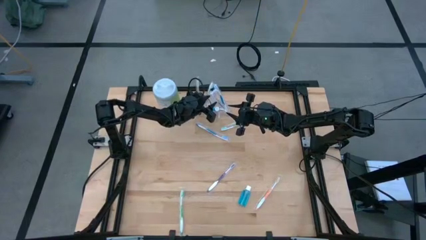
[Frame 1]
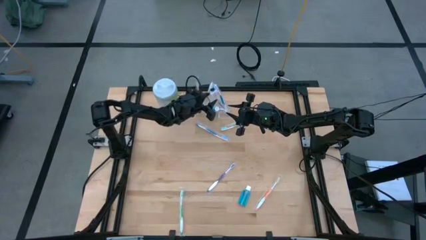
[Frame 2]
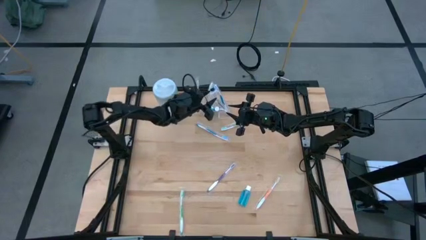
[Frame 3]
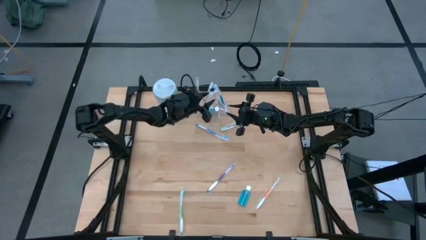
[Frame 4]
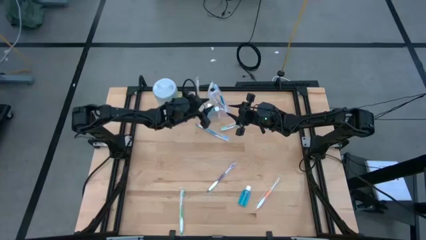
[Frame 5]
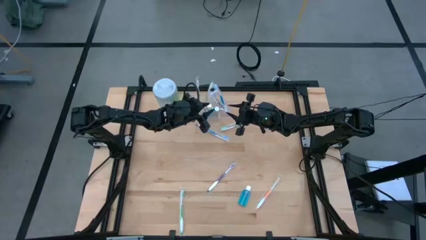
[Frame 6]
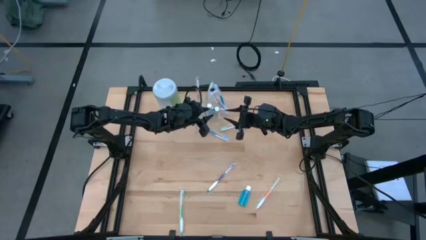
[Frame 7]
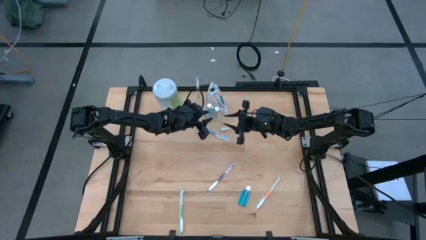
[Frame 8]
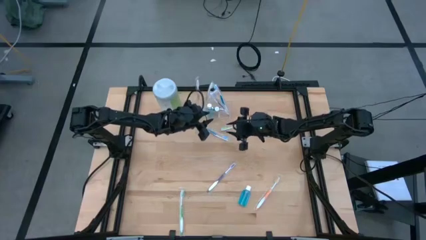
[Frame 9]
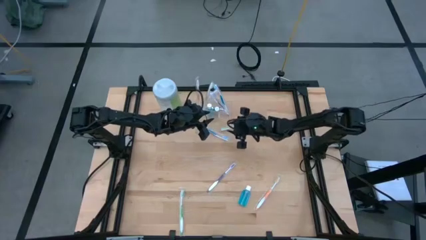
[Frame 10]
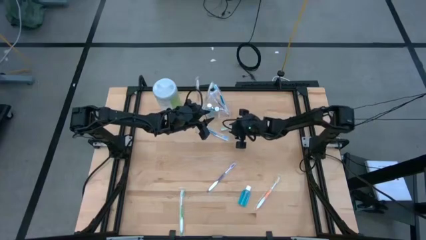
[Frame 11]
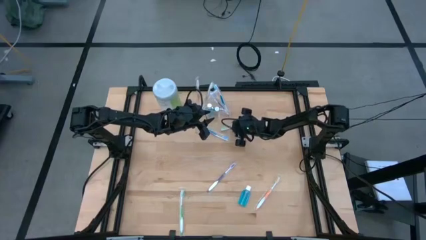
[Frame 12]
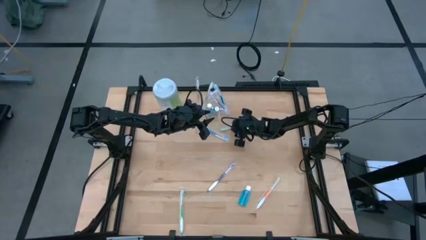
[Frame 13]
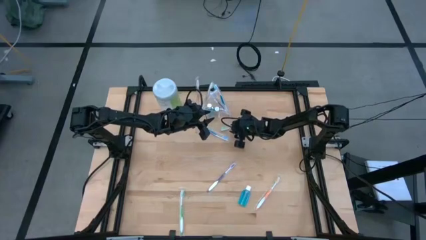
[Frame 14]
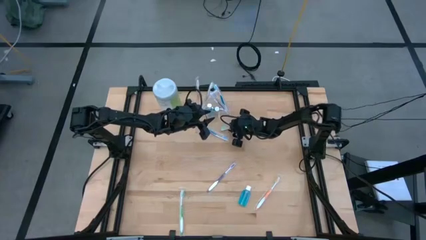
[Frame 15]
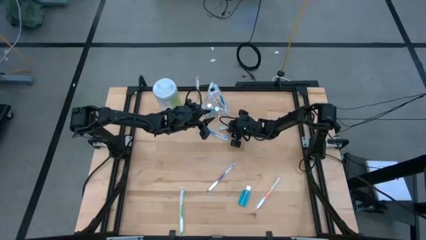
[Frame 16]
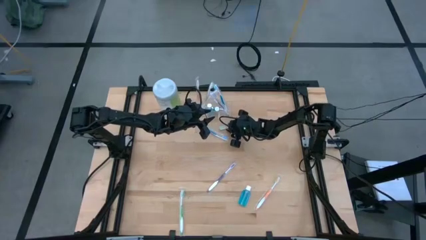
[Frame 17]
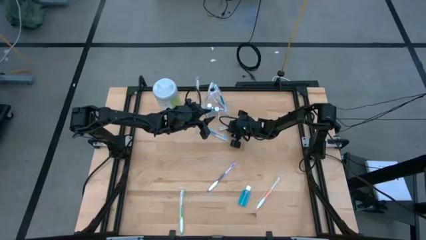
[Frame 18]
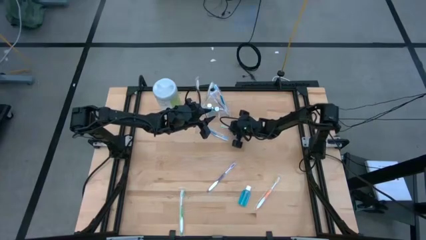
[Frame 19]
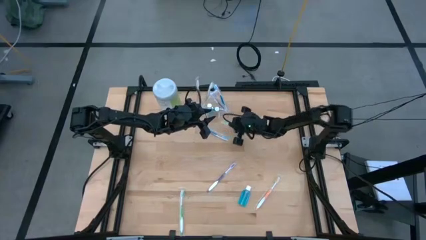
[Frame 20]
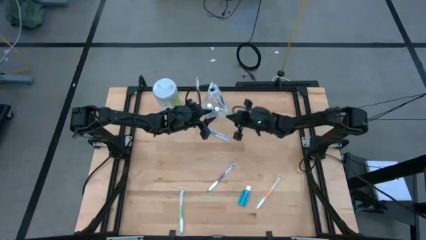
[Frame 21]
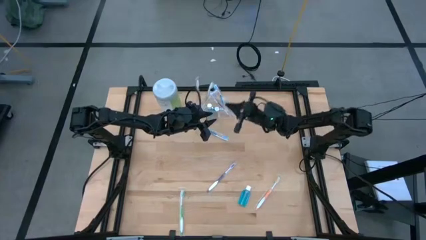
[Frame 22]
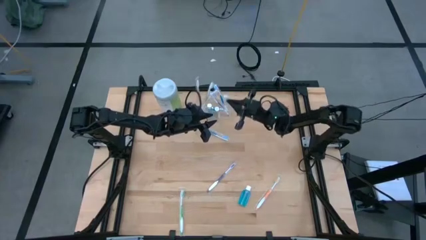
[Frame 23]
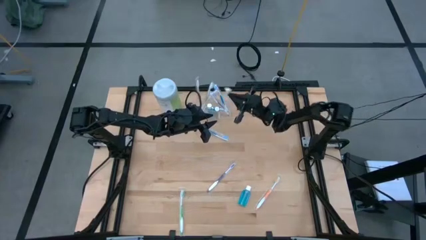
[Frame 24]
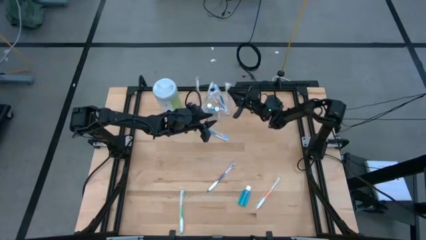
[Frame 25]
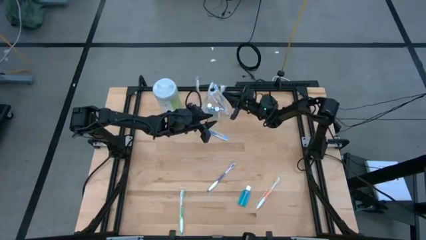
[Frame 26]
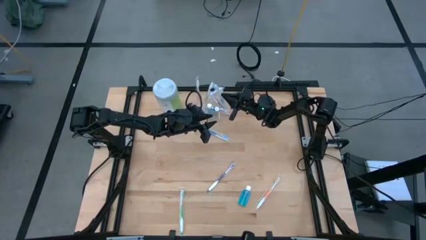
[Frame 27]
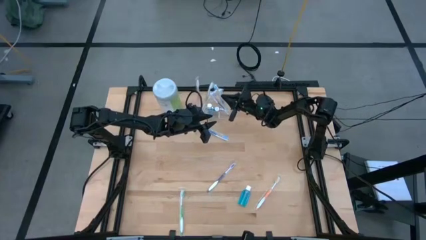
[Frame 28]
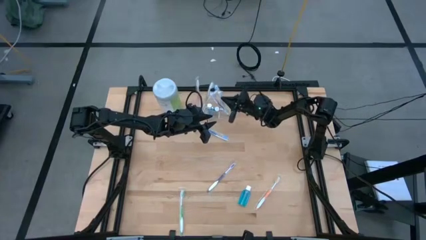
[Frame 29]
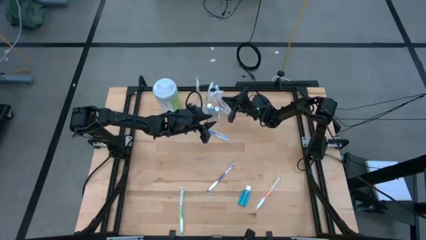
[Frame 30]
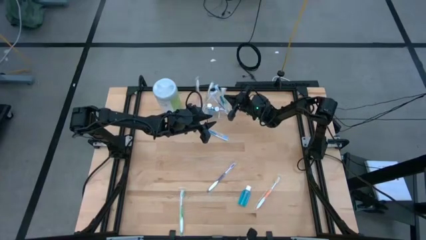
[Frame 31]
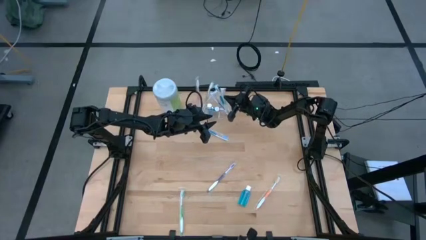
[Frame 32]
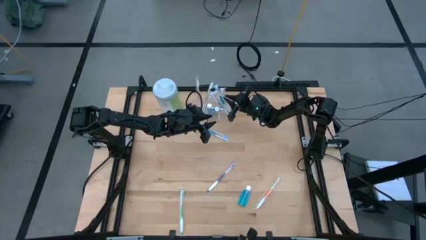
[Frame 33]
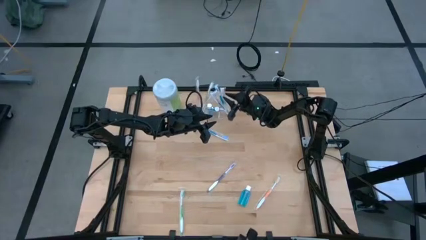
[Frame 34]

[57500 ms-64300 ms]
Task: Pick & Place toothbrushing station
Put the top green toothbrush into the transparent organizer

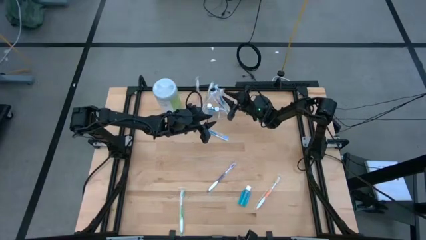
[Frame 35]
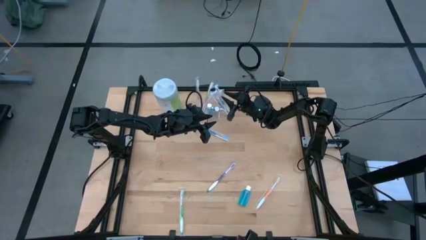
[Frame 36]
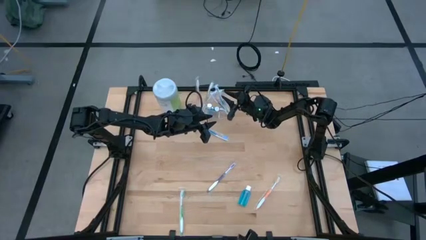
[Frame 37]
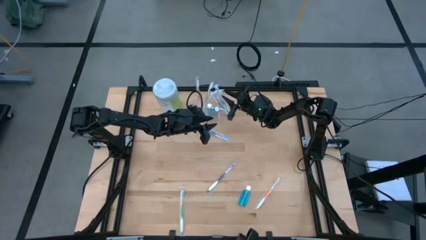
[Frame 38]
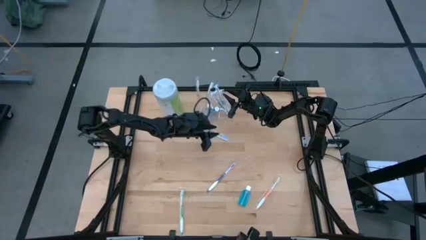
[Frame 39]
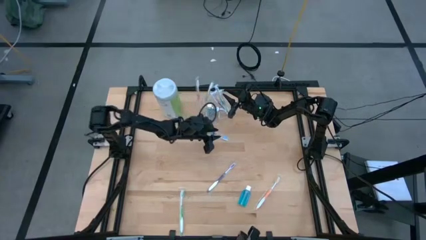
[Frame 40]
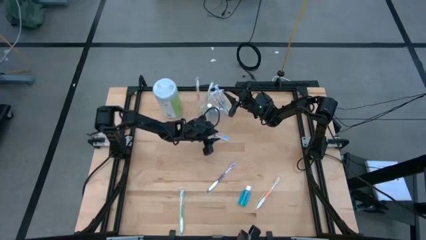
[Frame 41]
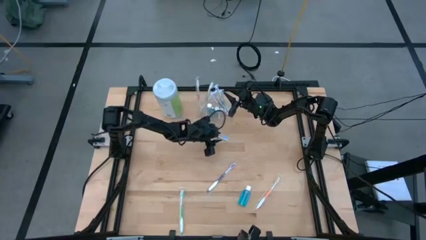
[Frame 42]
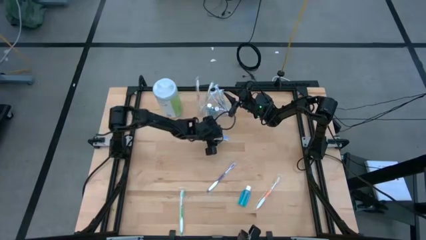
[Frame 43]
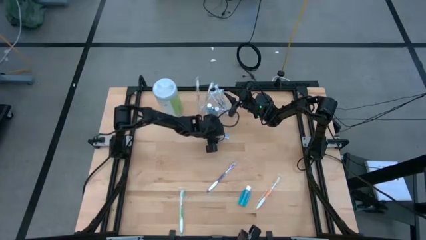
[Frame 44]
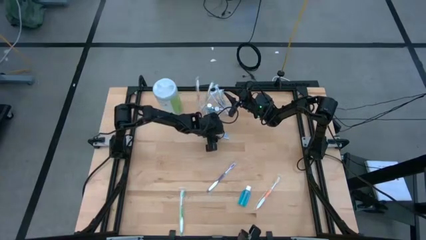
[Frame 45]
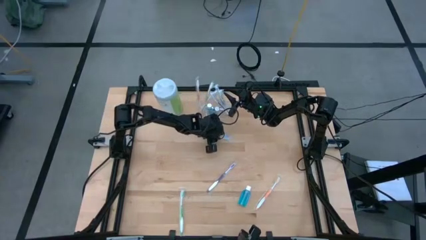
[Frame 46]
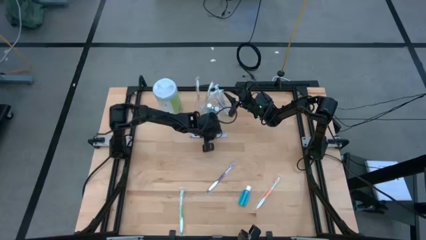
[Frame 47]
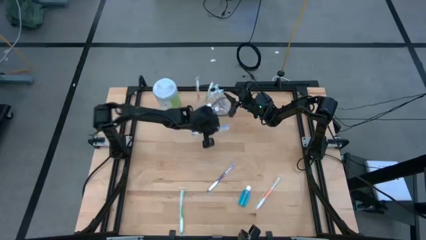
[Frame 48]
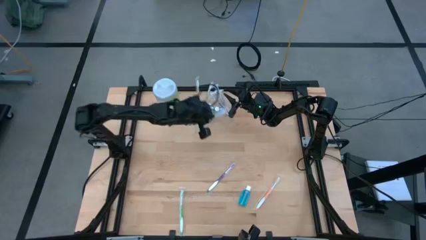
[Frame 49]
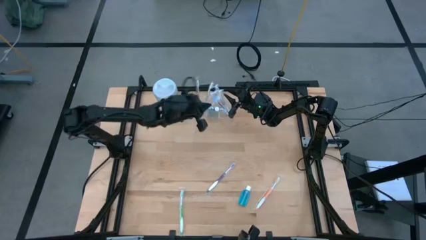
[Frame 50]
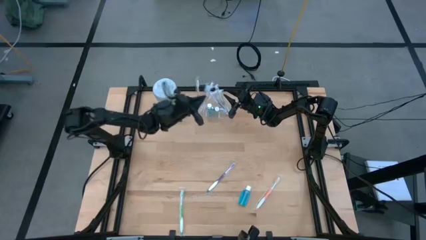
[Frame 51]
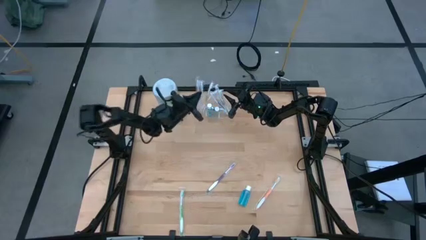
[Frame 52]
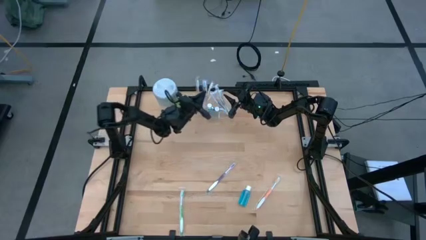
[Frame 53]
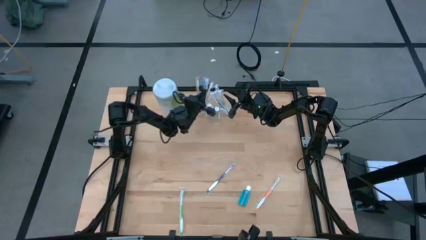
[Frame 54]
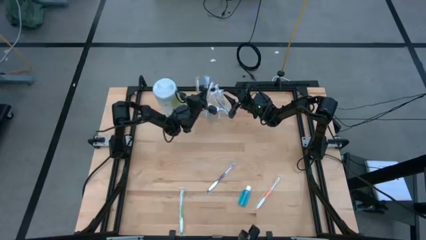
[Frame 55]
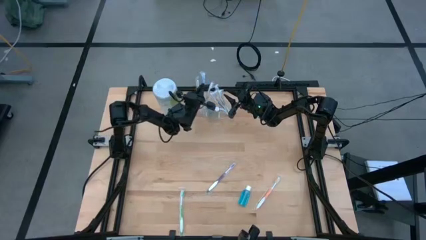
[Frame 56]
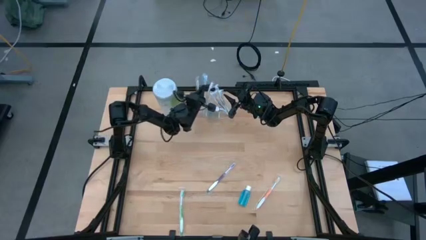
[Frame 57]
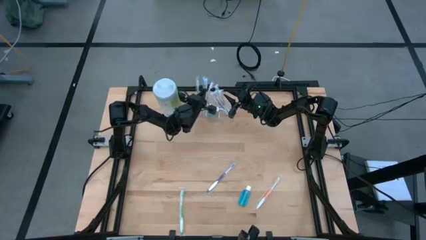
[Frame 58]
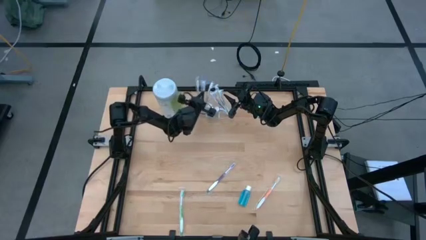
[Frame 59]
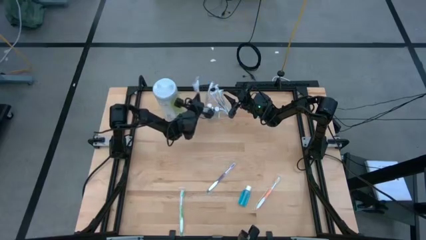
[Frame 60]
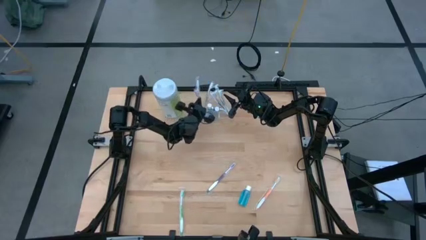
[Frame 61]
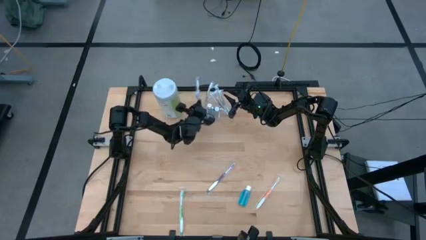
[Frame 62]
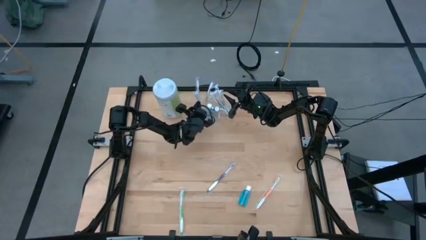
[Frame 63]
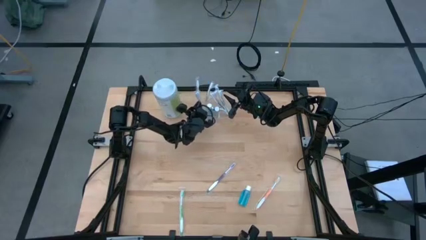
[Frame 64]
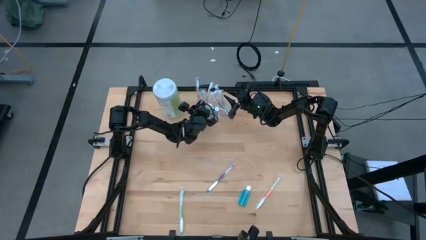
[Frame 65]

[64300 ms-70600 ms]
Put the blue toothbrush into the transparent organizer

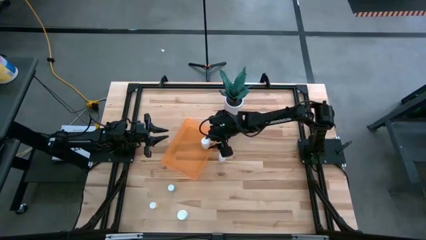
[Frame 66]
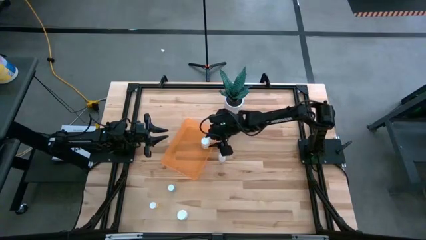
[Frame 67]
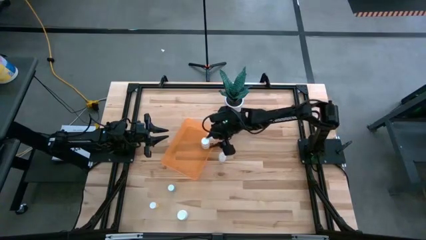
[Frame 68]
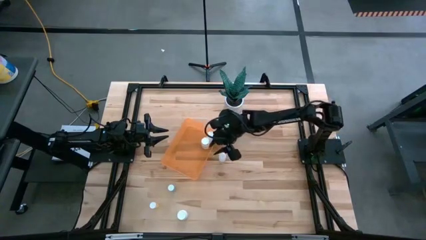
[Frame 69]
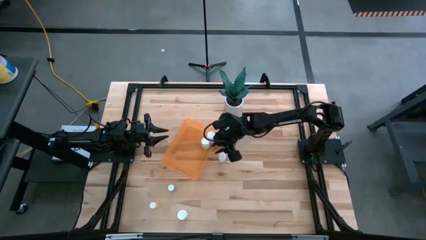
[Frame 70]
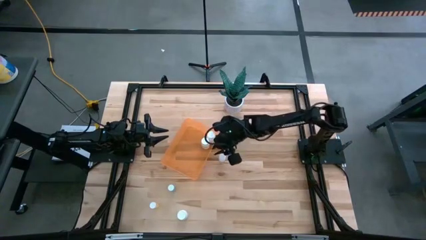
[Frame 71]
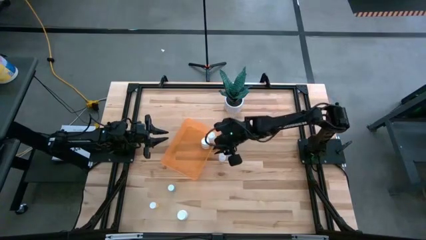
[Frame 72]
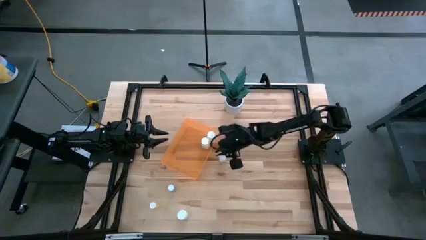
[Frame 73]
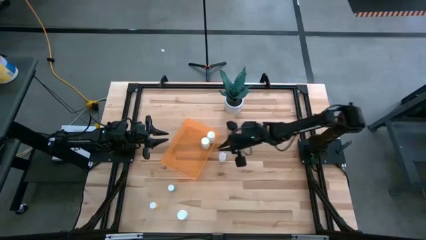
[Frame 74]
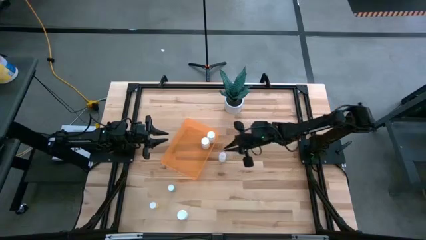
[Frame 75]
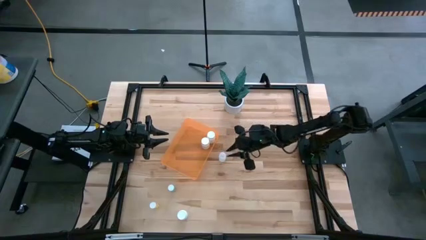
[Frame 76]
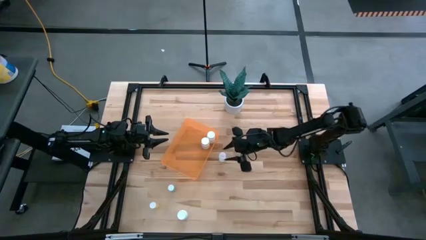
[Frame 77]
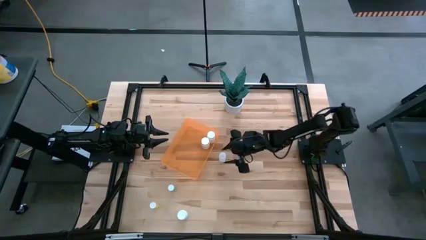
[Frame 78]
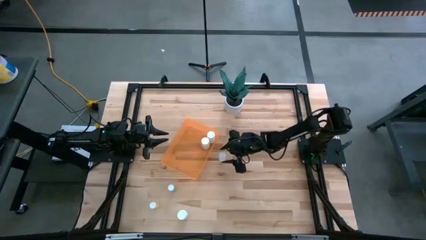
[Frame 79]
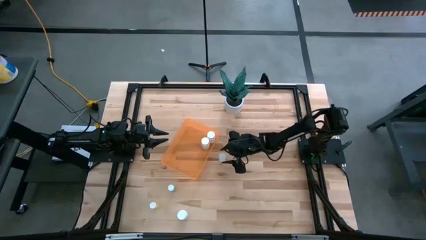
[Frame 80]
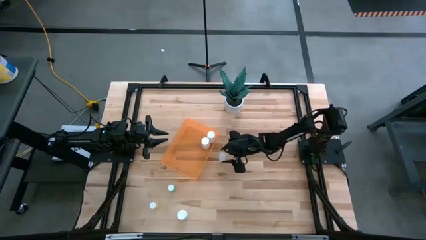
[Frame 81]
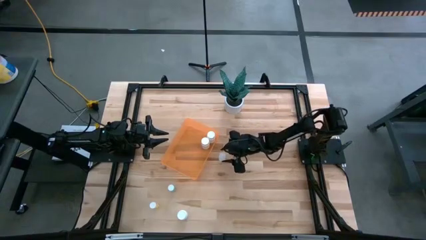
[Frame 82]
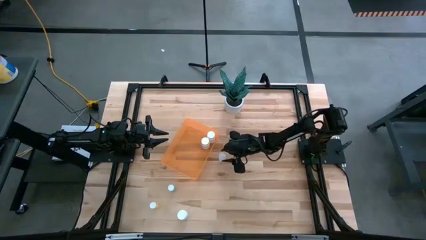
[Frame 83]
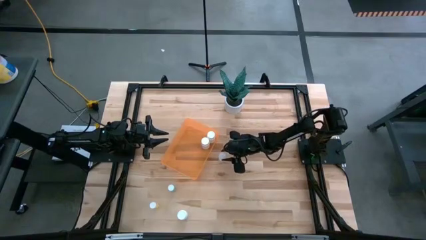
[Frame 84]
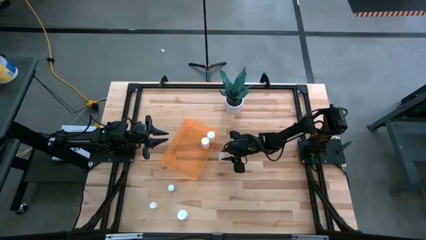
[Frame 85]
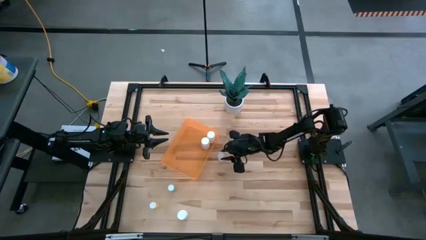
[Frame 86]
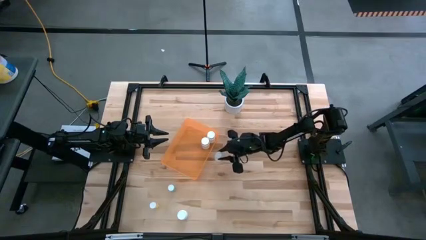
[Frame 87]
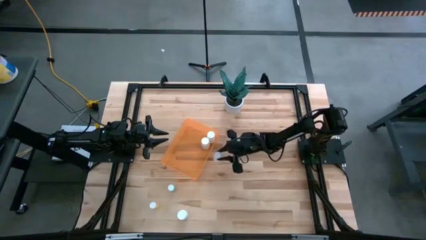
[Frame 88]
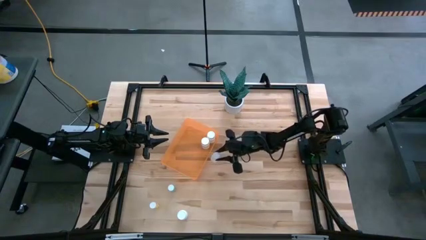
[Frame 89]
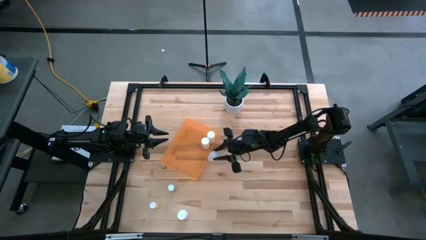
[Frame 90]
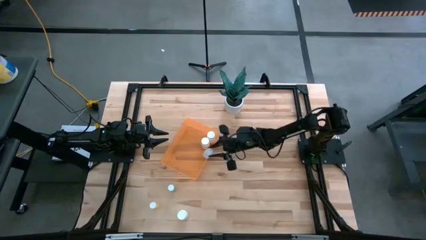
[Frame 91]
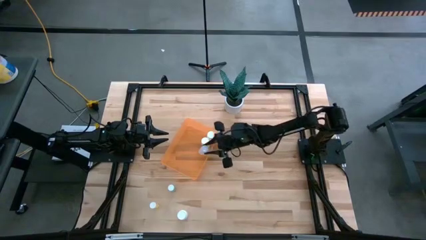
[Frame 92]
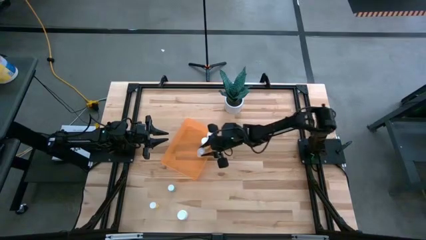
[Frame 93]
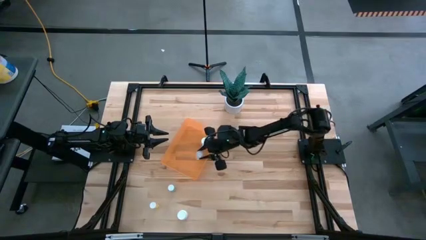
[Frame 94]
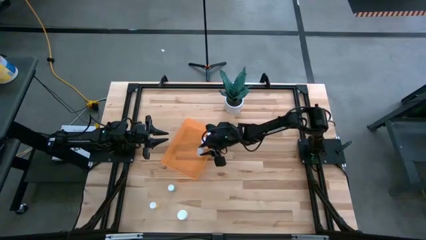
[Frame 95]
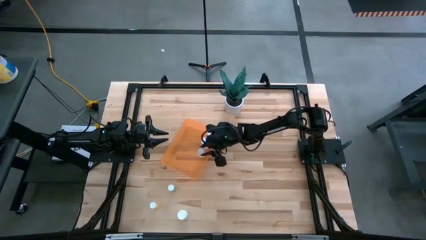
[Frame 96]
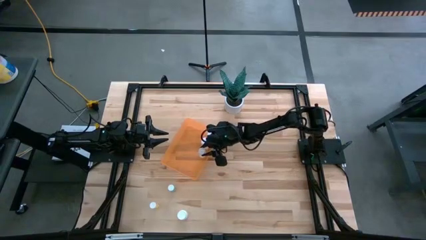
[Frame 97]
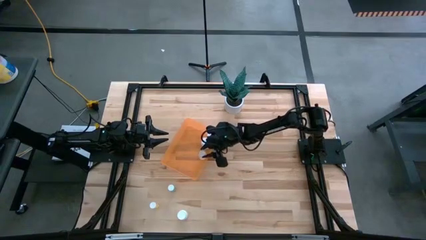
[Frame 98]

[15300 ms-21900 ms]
Task: Pick and place pill bottles into a basket
Put the transparent pill bottle into the orange bin
